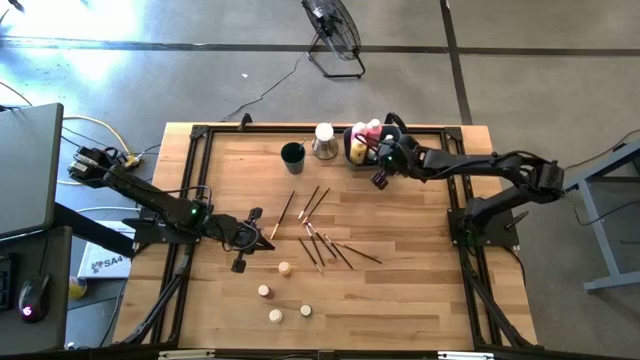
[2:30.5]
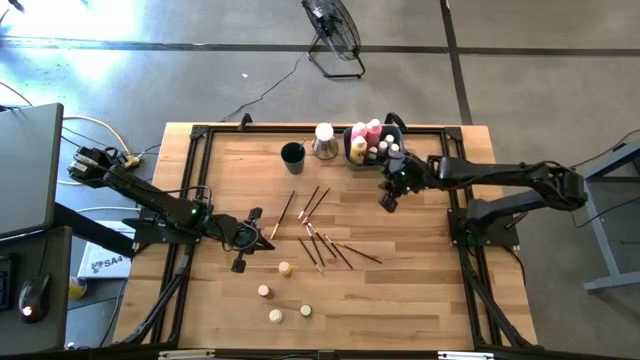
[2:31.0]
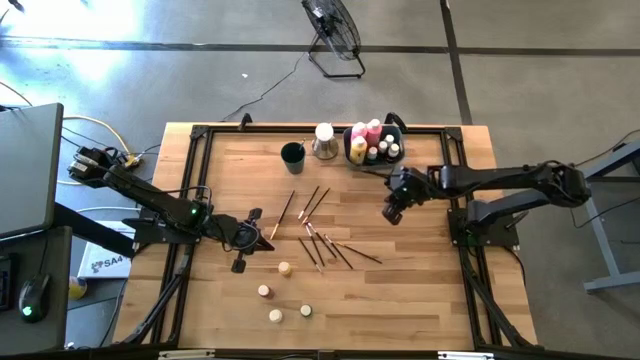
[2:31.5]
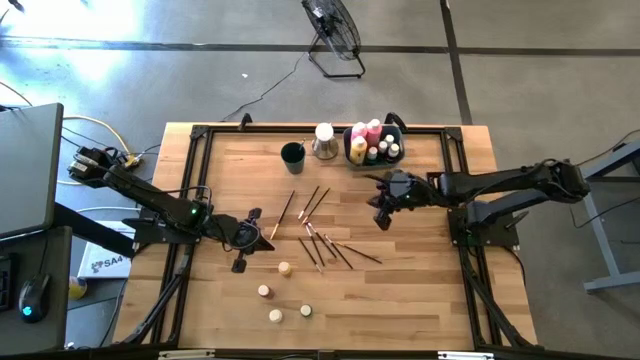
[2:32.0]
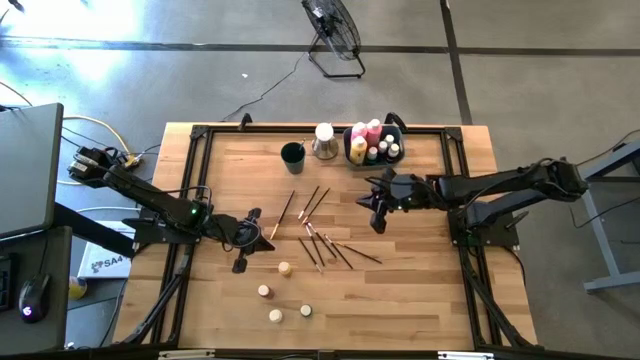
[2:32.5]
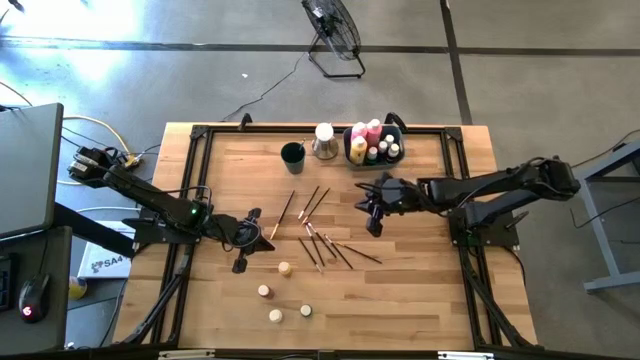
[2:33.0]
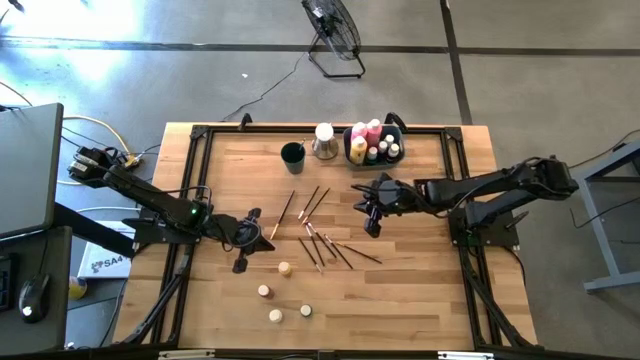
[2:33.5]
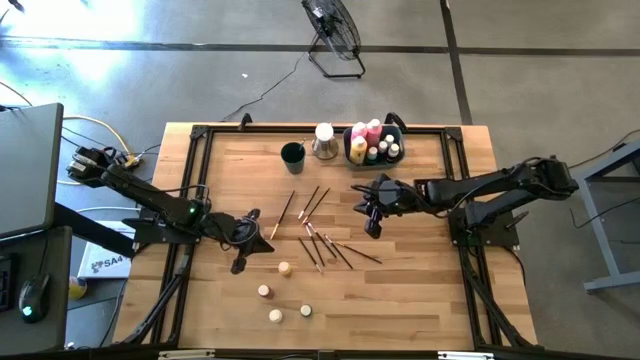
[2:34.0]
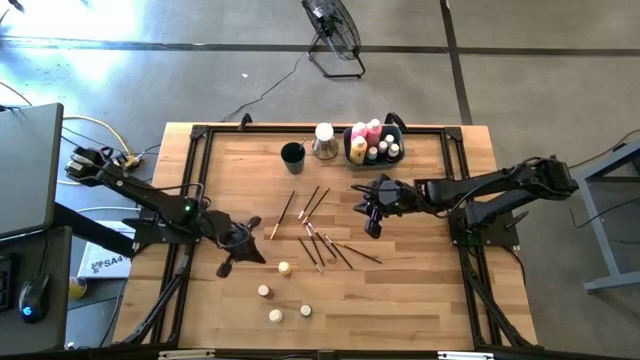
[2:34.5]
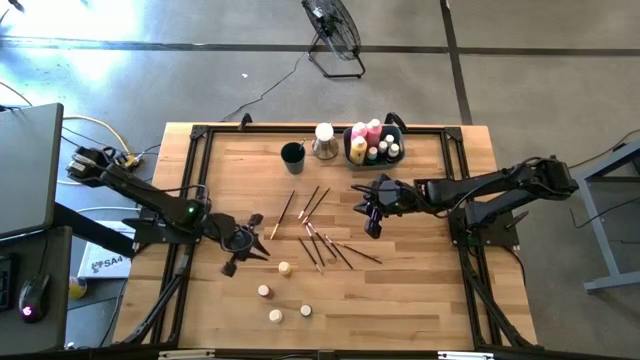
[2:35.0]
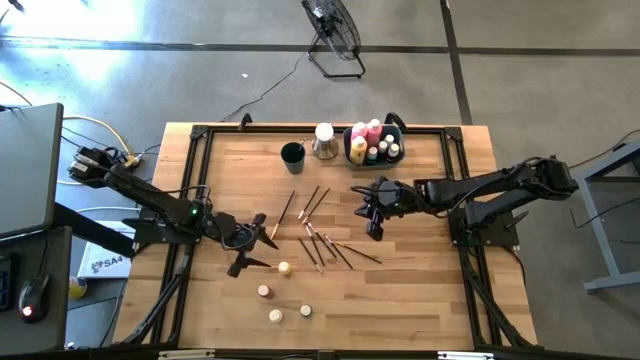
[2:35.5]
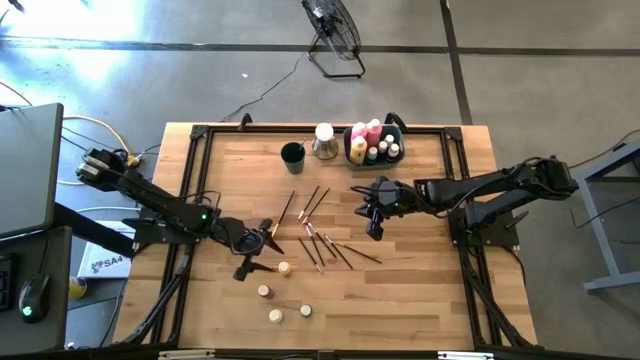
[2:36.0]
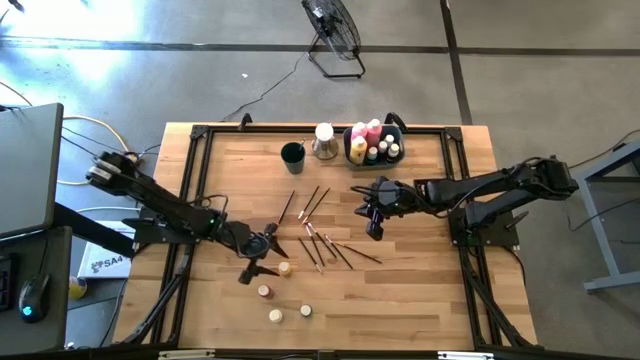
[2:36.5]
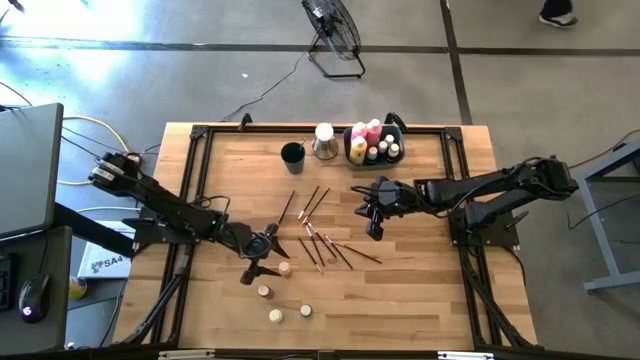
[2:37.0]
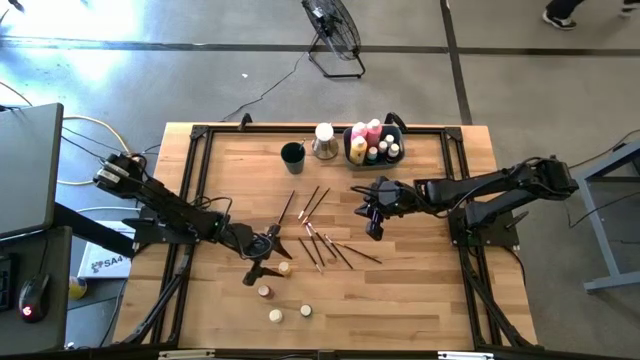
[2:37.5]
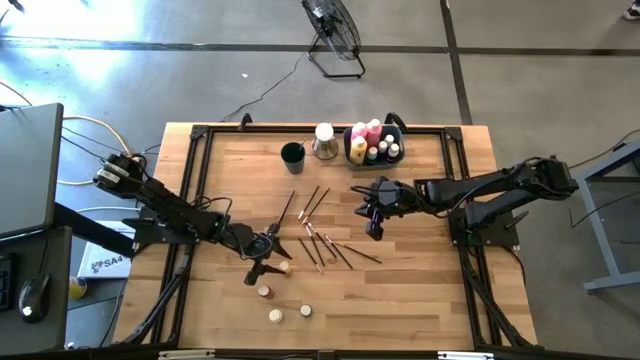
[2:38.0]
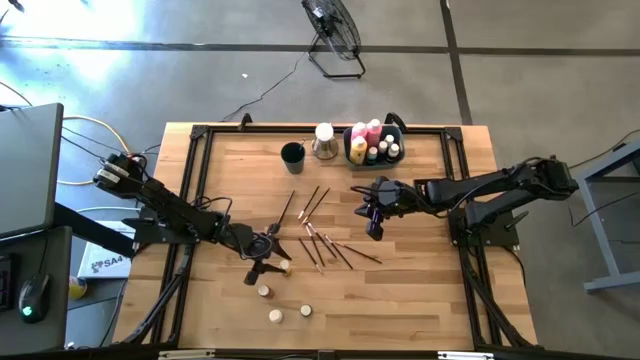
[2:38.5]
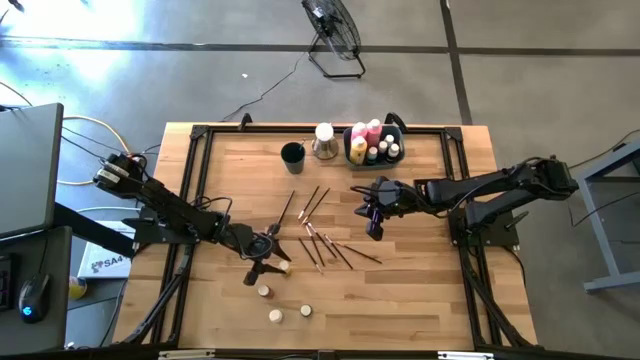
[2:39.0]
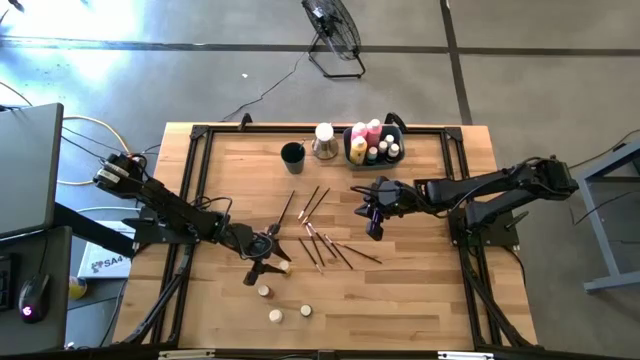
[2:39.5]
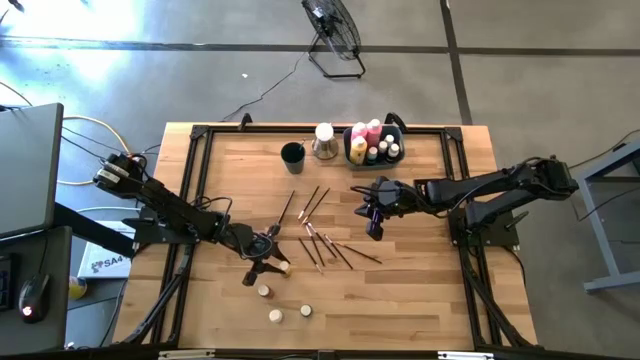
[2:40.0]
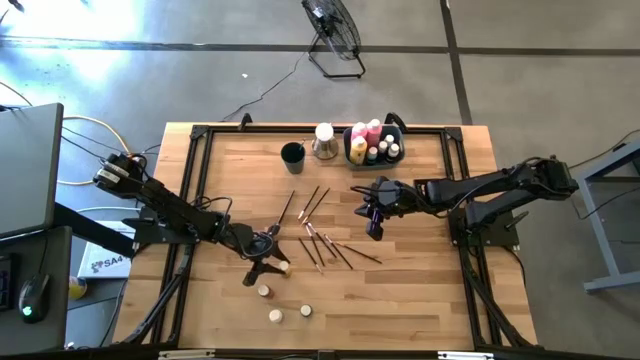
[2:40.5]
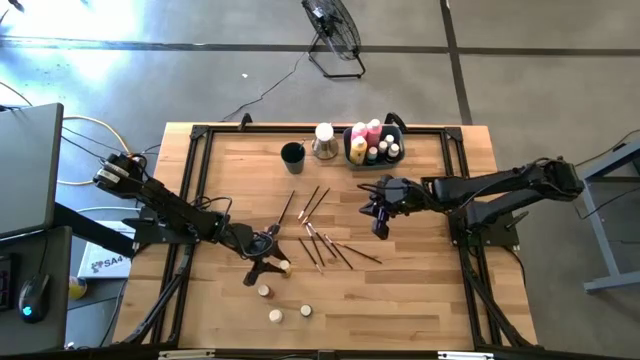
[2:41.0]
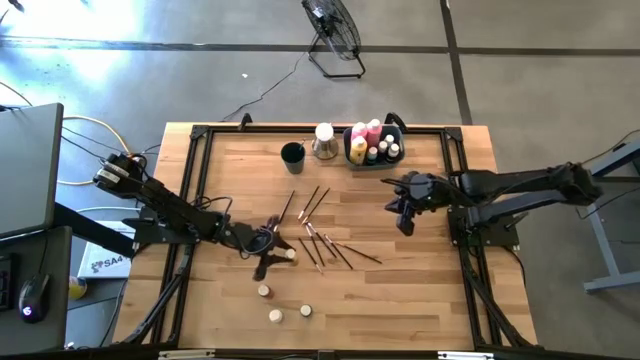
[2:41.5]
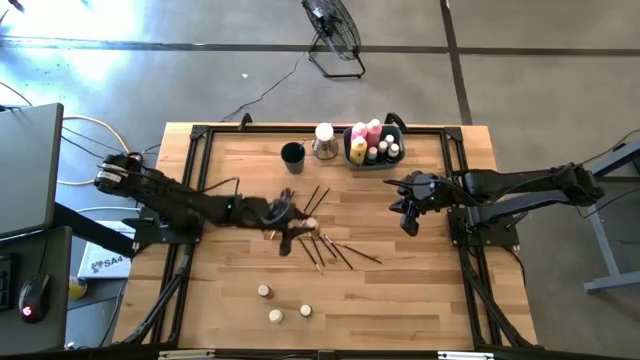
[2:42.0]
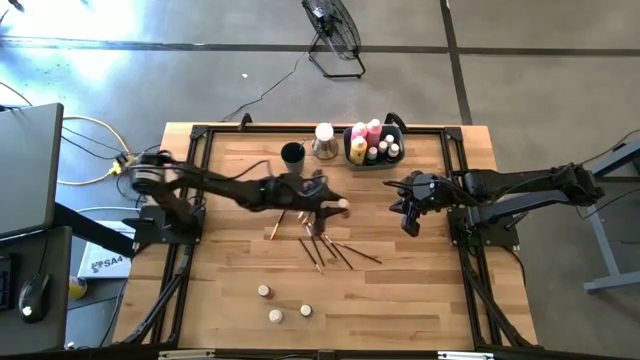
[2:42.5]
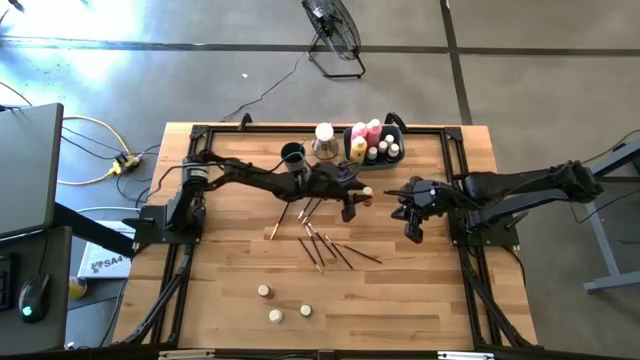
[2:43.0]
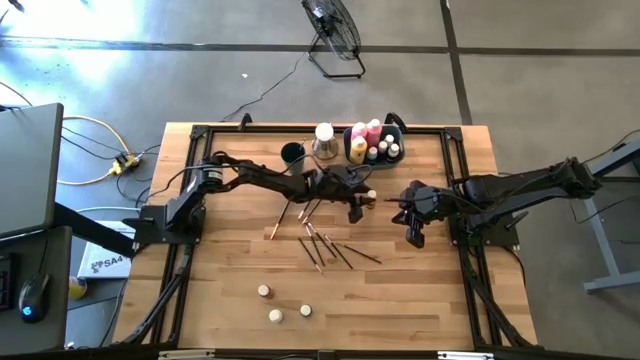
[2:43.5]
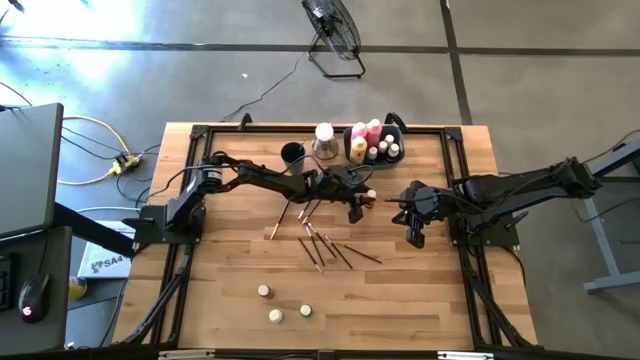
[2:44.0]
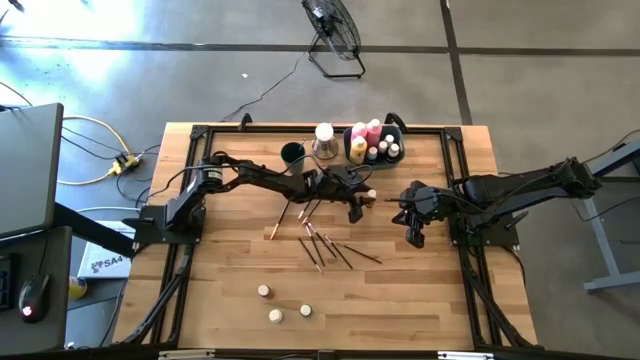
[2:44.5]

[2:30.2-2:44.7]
Task: Pick & Place Paint Supplies
Move the small yellow paint bottle to the center of the table
